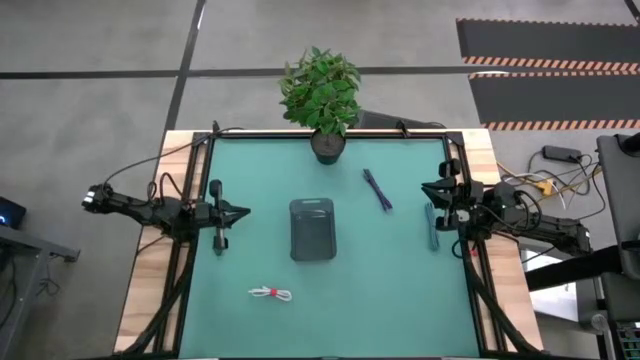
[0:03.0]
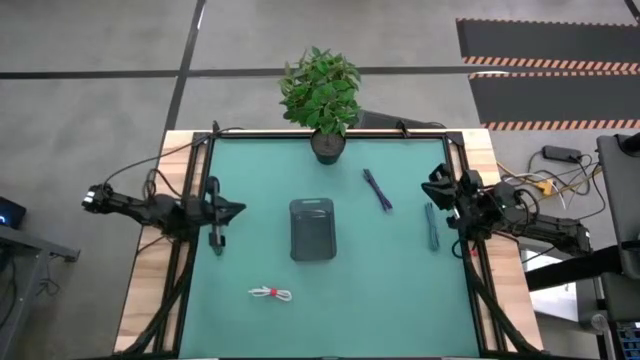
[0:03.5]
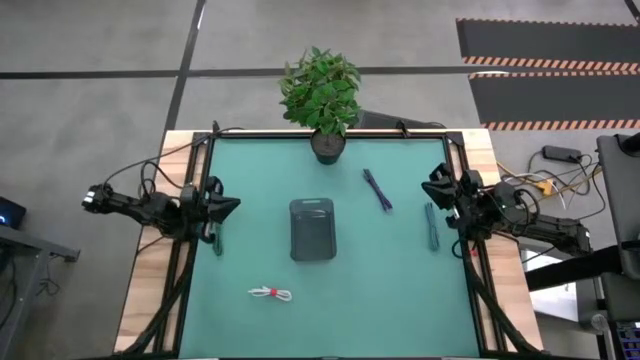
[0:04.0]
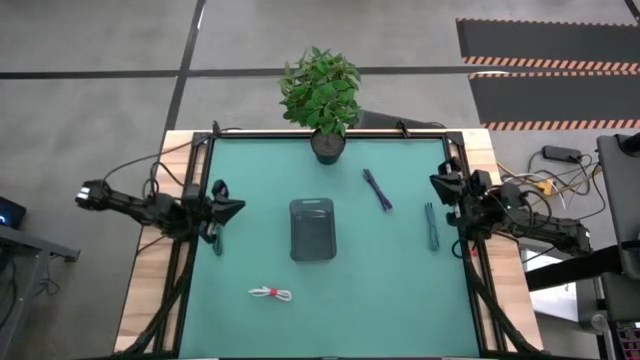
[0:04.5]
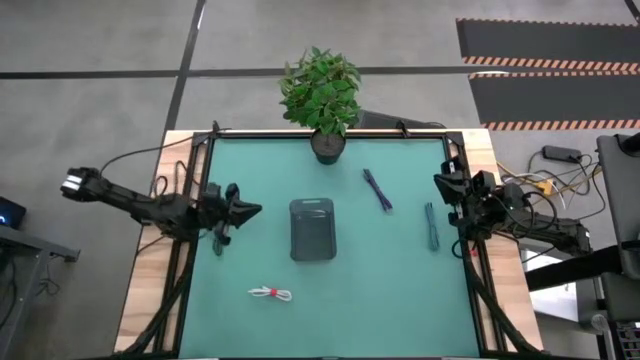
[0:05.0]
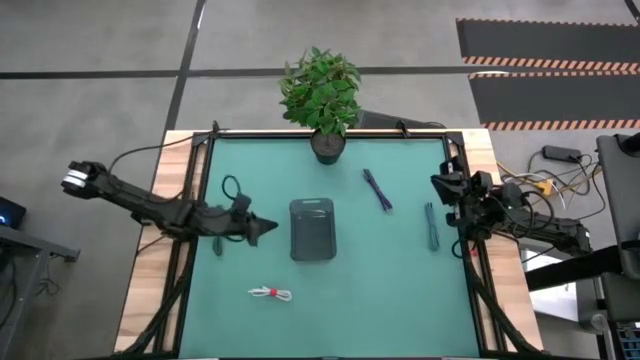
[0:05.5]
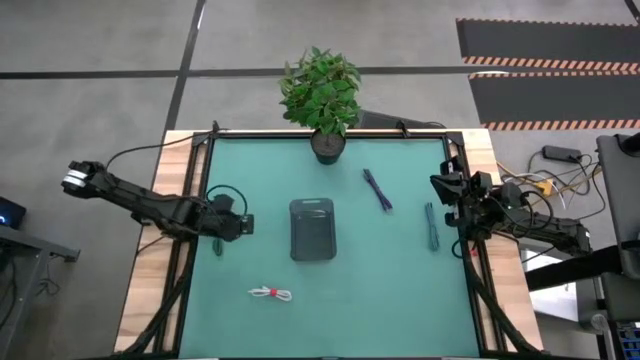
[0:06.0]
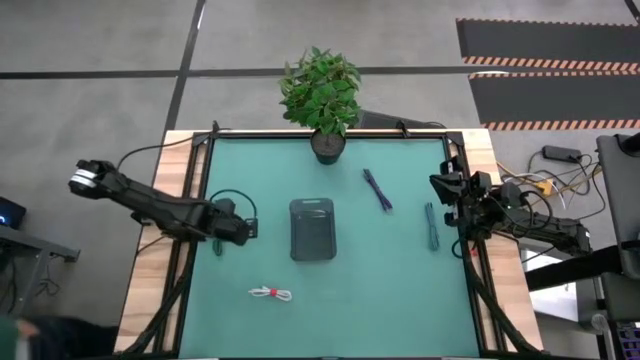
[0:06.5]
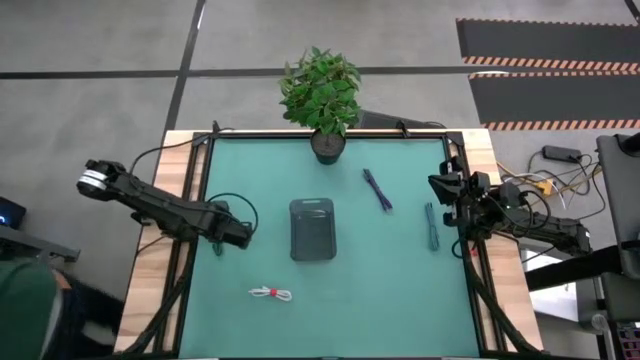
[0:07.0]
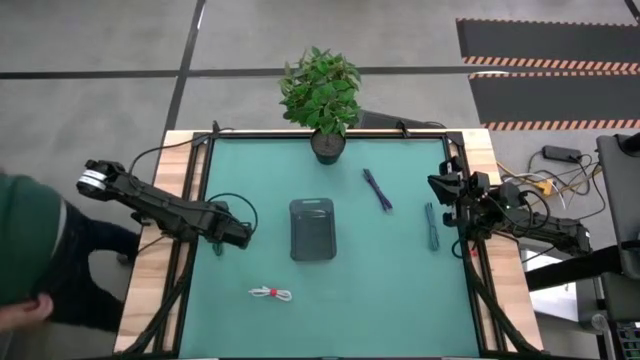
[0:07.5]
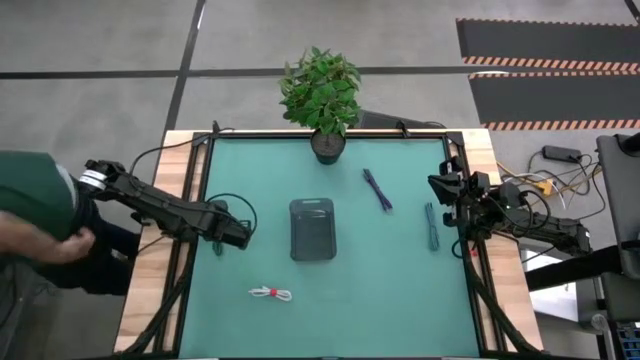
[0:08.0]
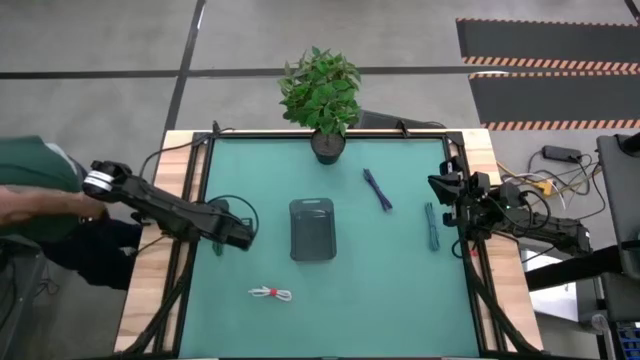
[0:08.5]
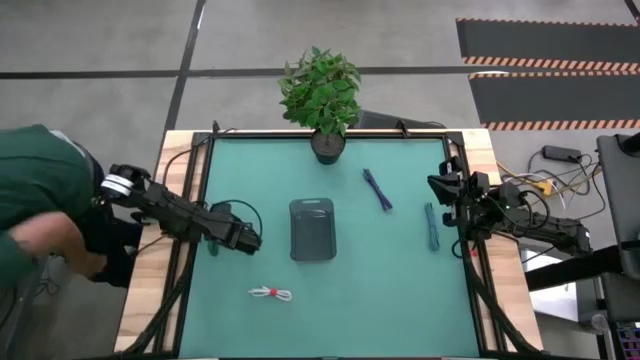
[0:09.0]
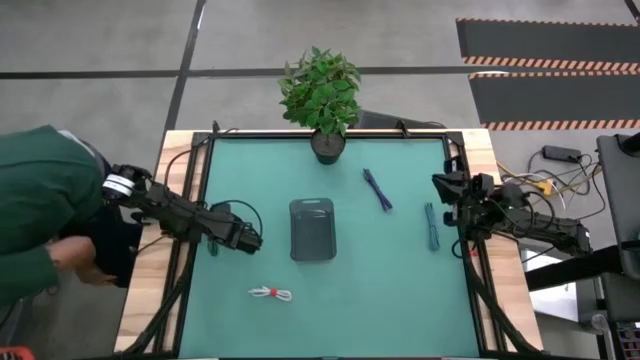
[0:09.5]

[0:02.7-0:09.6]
Task: Pick and place USB-C Cables
Put the green charger cable into the black bin

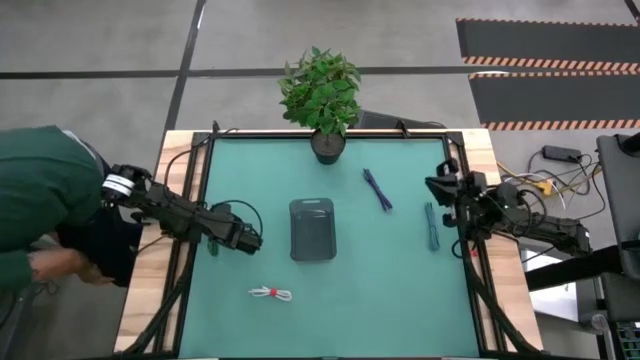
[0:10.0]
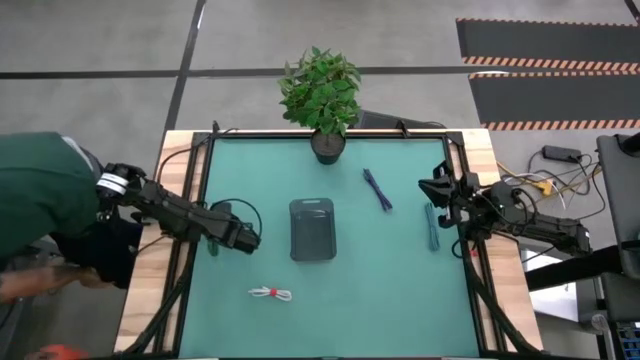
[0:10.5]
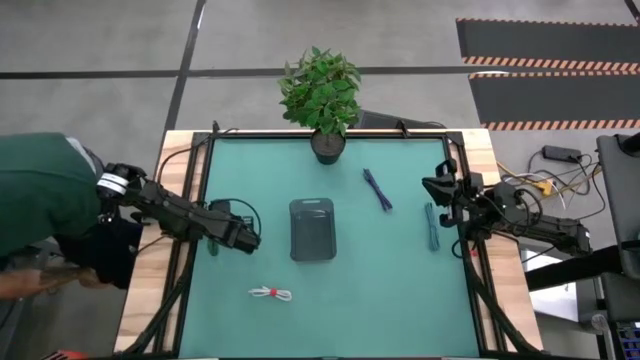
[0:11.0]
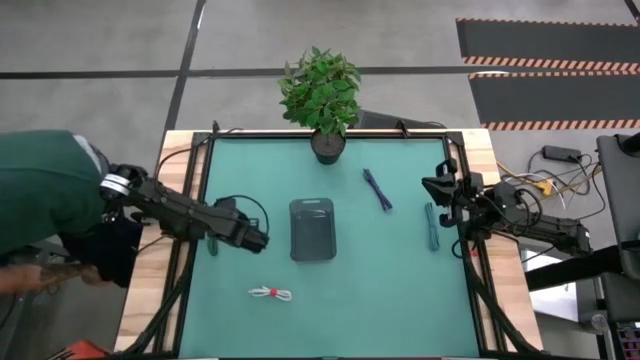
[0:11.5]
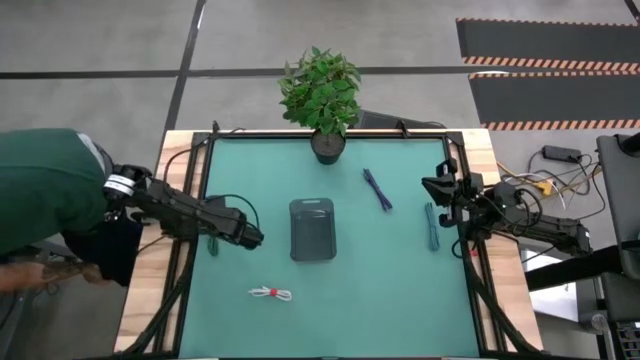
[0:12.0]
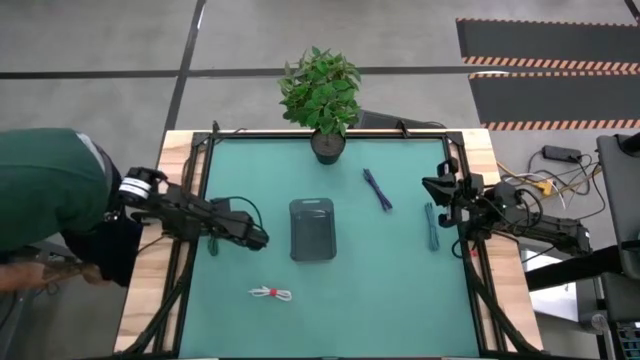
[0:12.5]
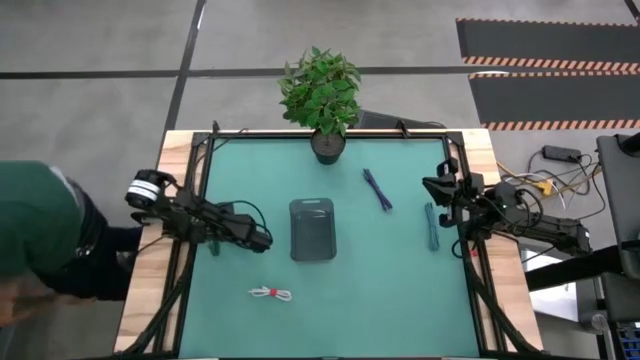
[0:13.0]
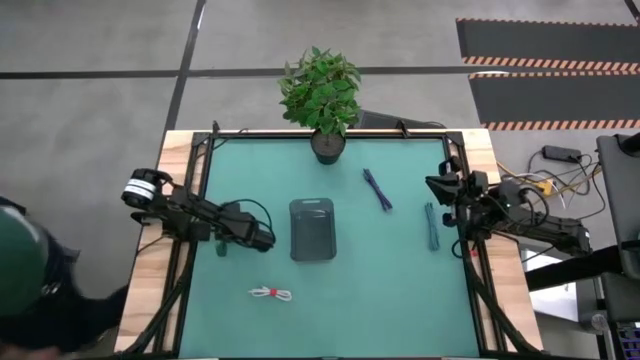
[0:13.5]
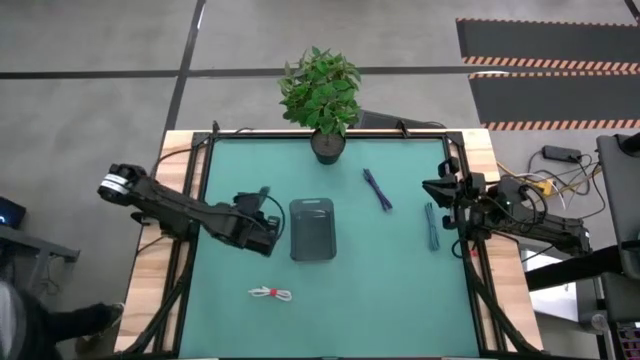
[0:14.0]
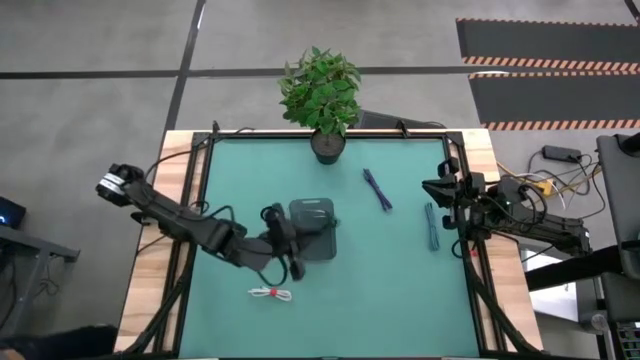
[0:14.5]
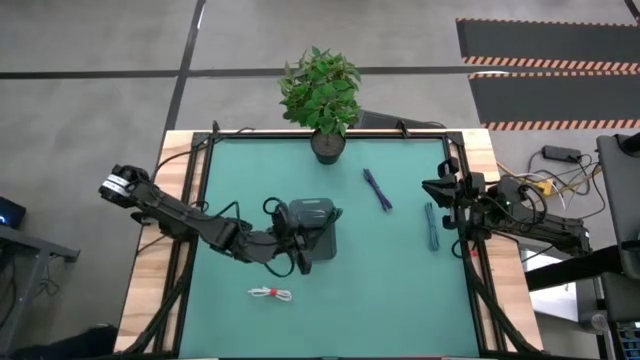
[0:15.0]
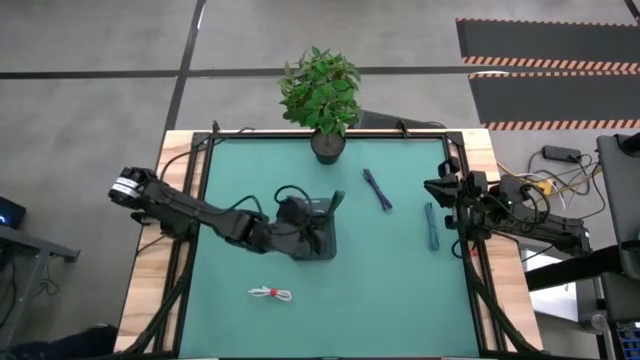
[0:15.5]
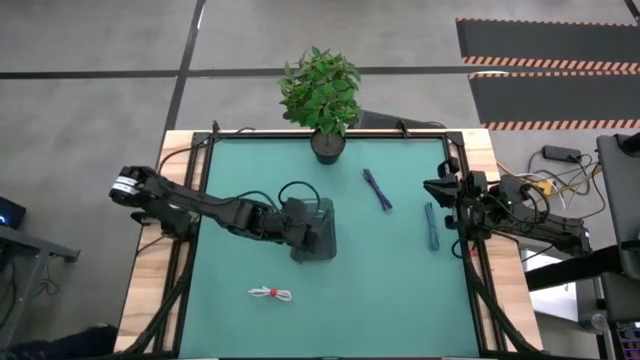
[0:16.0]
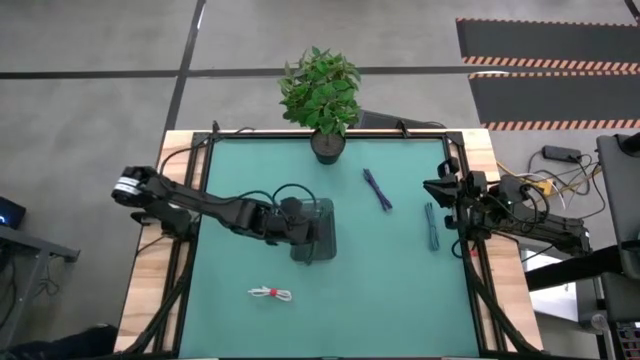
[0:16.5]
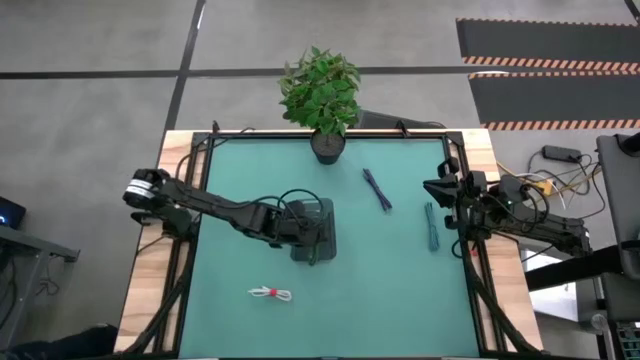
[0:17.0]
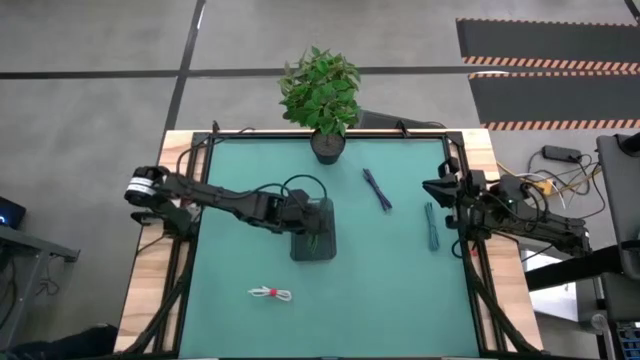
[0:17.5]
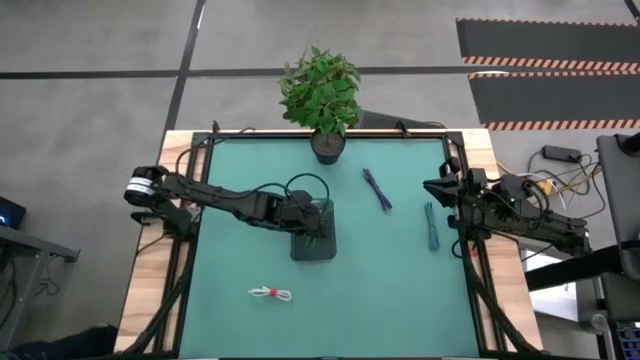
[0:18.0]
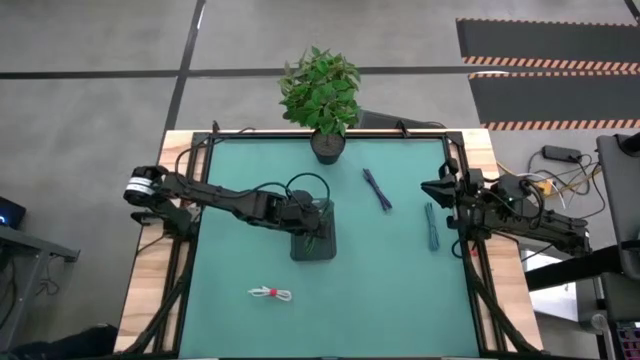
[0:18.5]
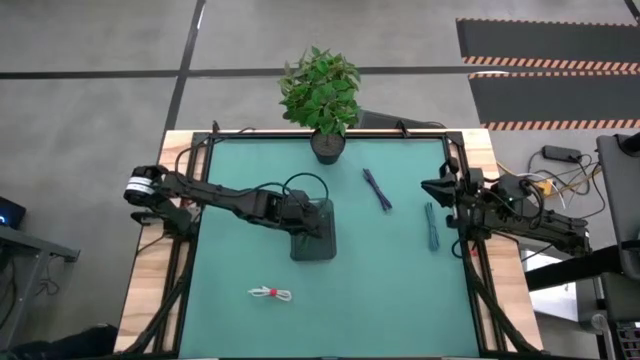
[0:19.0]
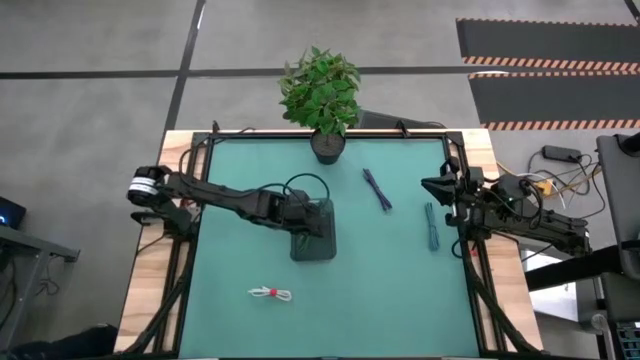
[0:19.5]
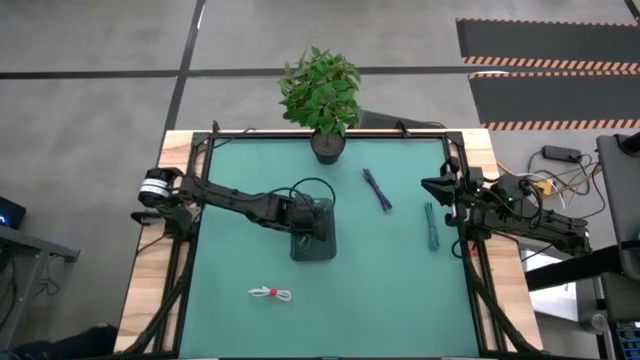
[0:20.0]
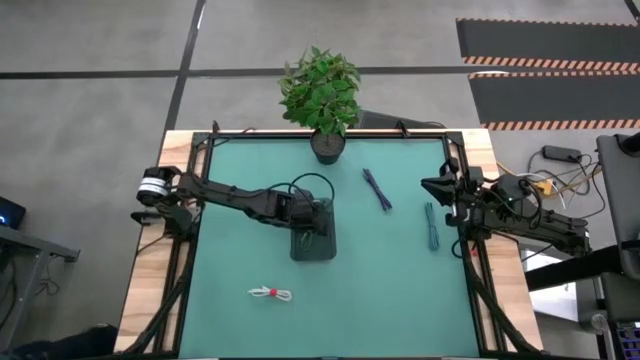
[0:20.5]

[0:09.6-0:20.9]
Put the green charger cable into the black bin

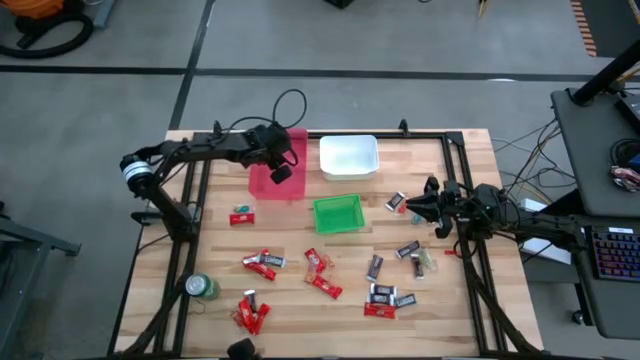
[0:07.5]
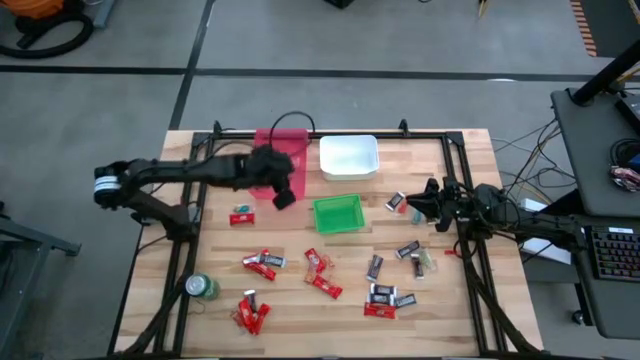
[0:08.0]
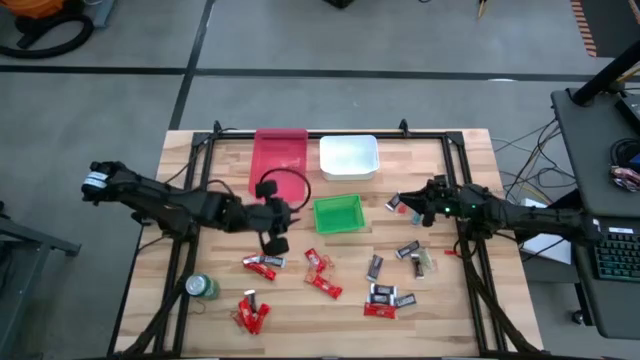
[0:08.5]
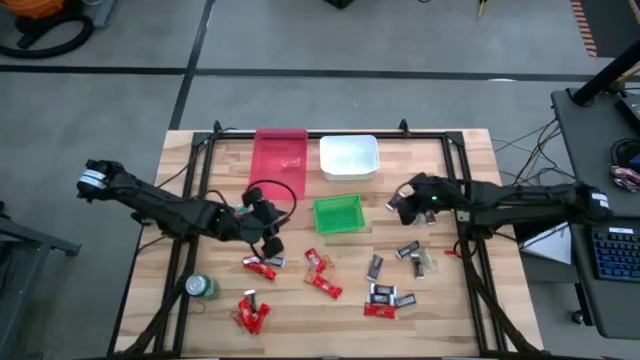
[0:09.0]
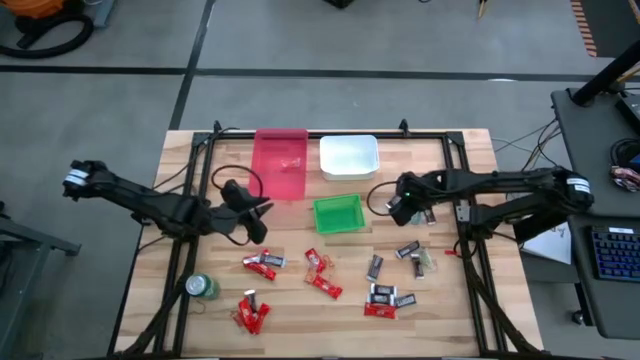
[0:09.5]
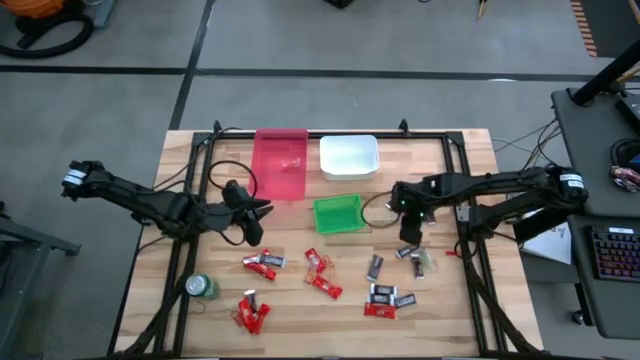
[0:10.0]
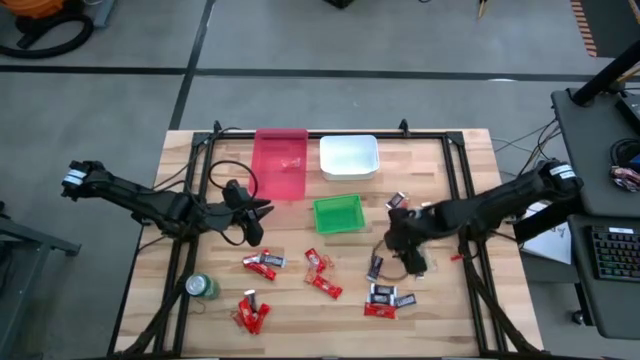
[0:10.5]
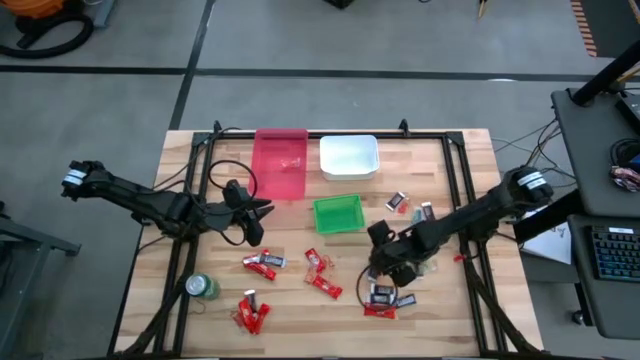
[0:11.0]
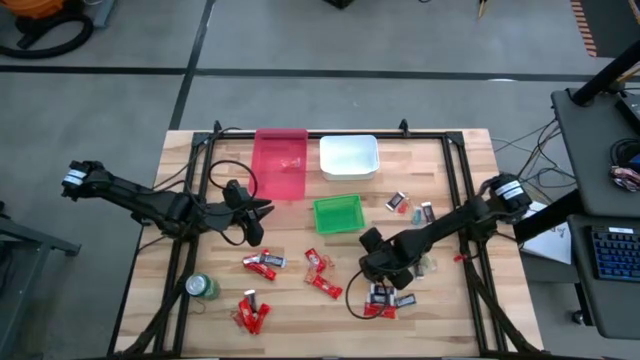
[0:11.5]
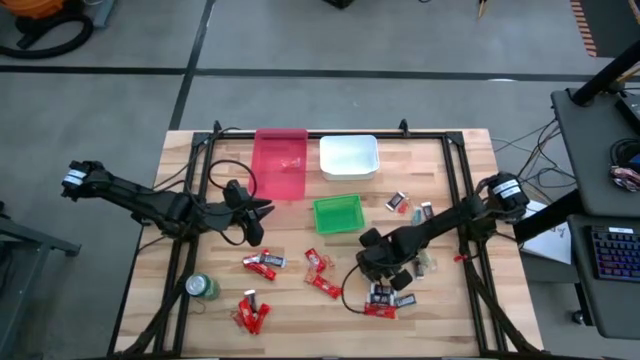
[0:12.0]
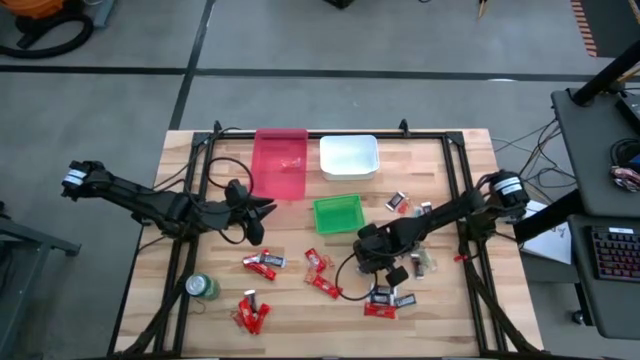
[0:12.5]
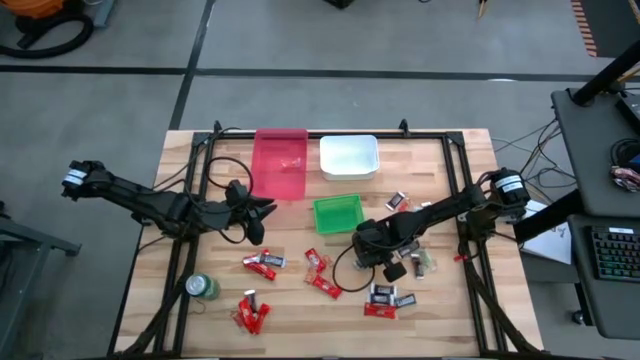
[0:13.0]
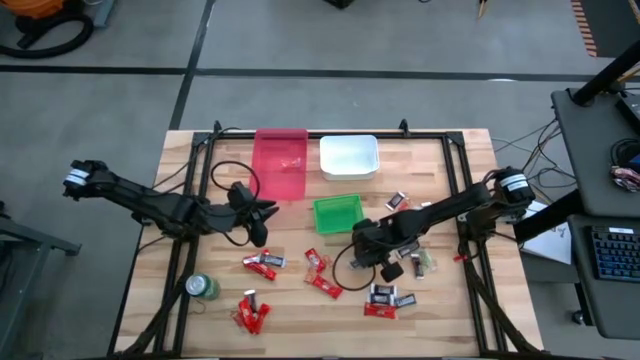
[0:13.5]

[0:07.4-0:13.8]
Task: Sort candy
Put the brown chocolate bar into the green bin
